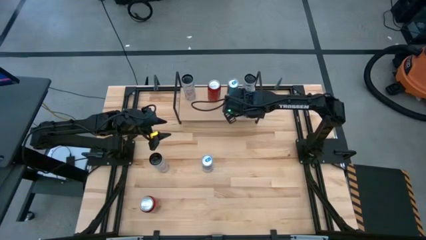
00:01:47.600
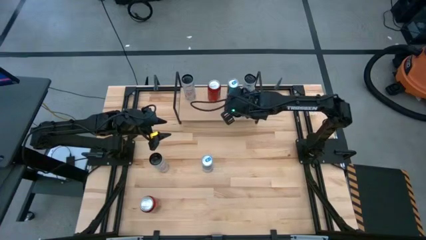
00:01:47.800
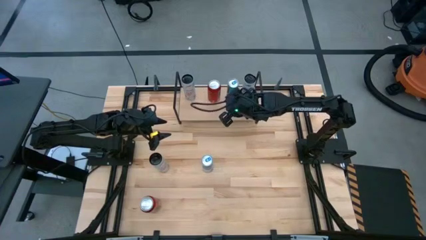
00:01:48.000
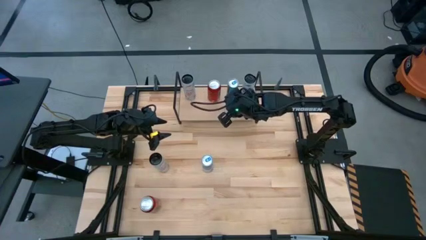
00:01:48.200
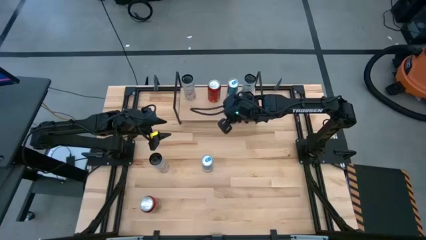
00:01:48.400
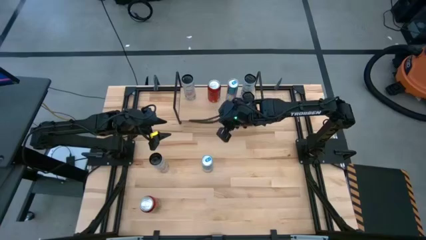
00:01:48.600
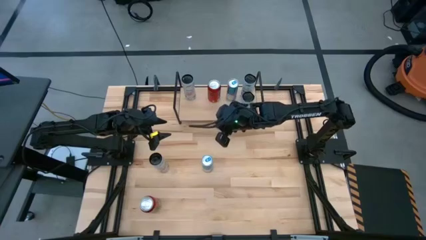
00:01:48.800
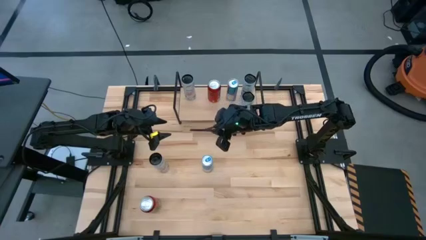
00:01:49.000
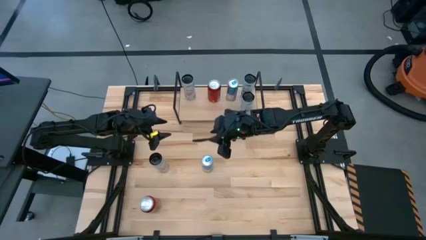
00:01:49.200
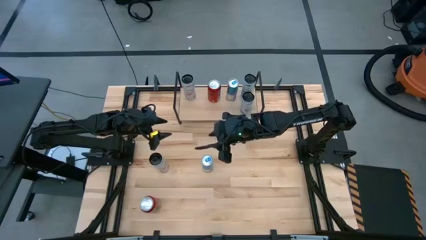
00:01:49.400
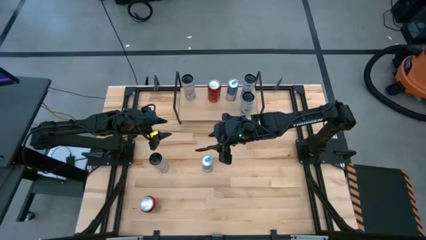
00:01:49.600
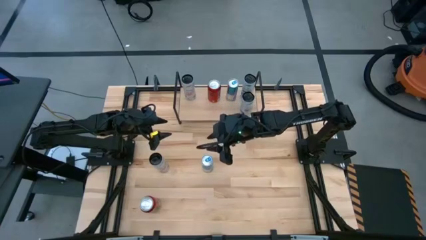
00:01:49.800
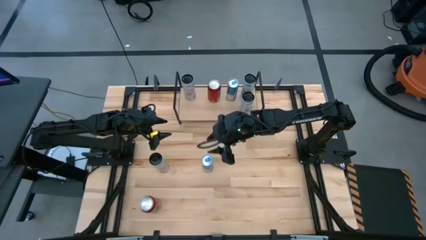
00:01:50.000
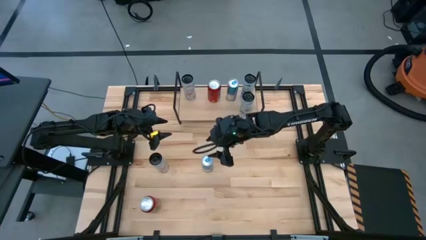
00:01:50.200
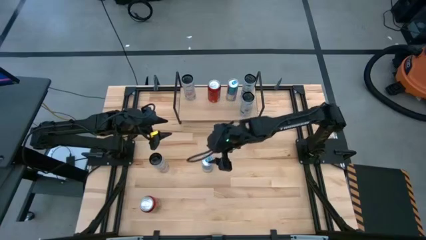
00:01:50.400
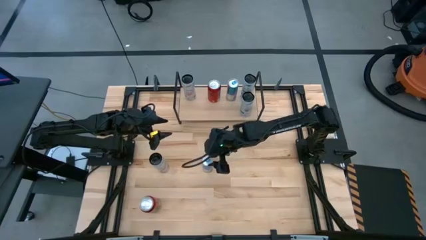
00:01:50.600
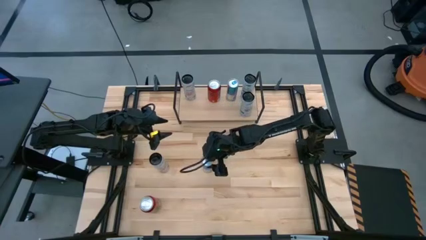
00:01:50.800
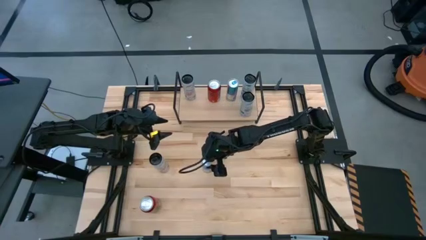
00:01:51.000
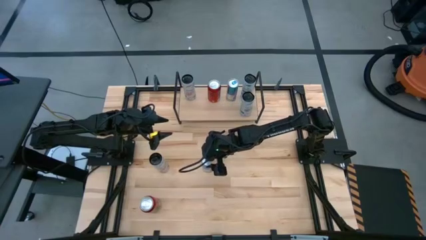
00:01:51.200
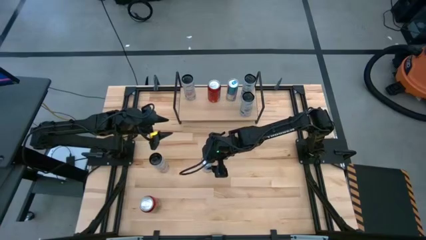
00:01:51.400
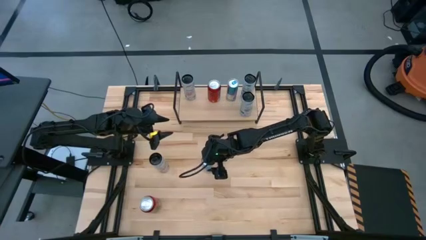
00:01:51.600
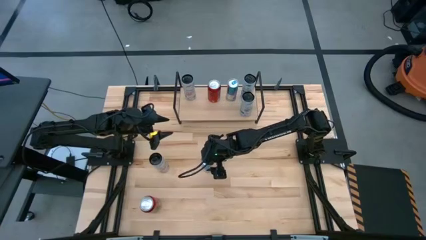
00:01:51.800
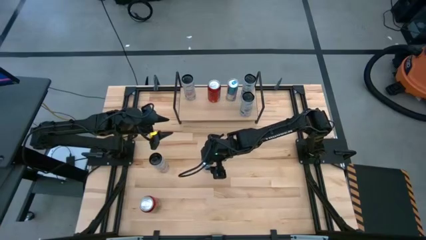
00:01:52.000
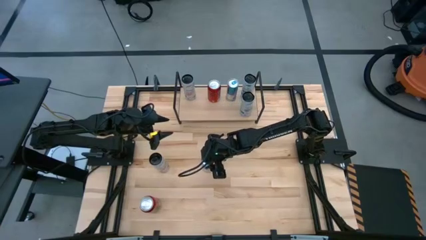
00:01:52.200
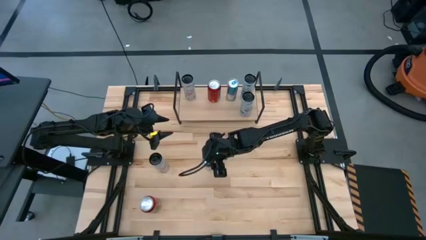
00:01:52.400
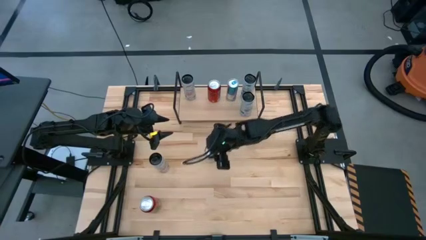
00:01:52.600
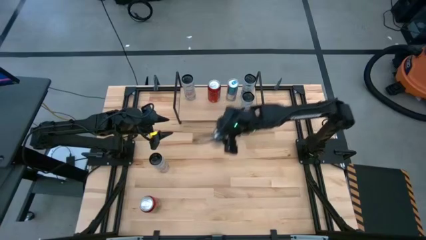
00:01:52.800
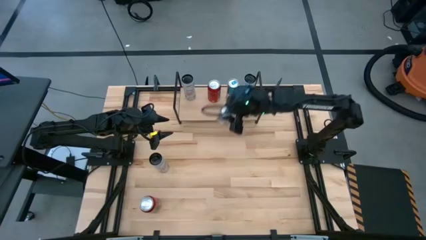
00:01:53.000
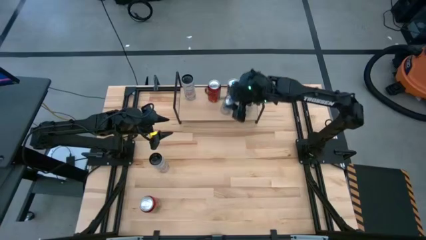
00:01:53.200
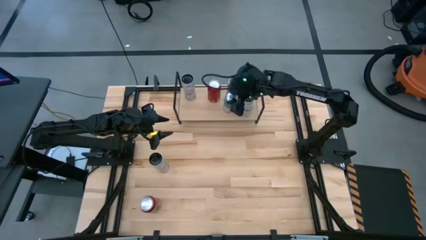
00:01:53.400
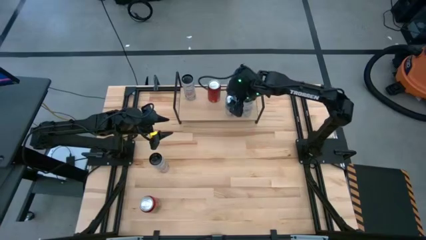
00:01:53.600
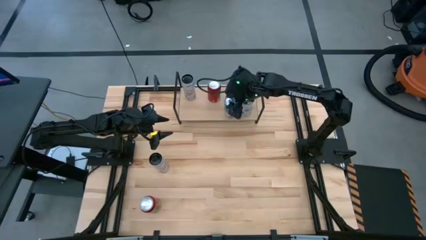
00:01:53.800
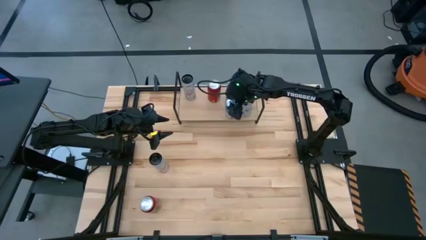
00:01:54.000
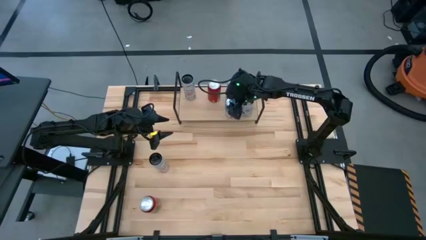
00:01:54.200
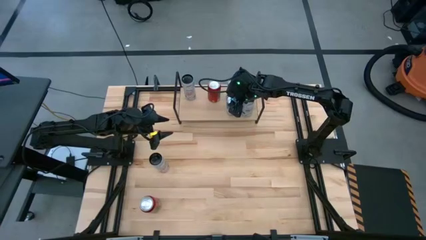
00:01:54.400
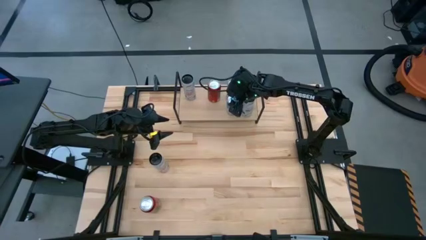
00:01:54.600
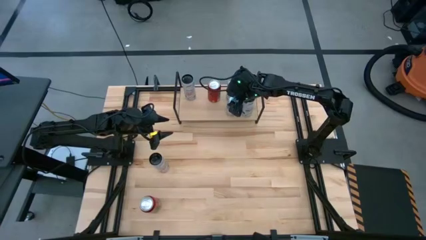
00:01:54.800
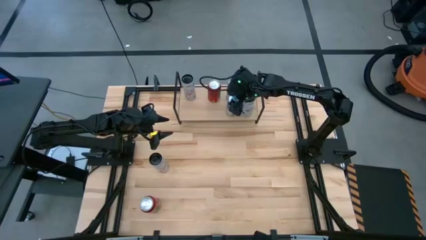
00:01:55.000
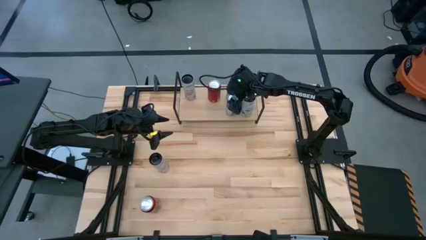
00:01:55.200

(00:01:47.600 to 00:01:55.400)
Task: Place canned beverage on shelf
Put the blue soda can on the shelf aligned with the other blue soda can

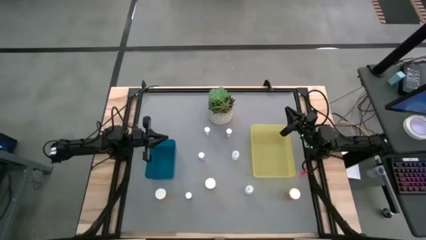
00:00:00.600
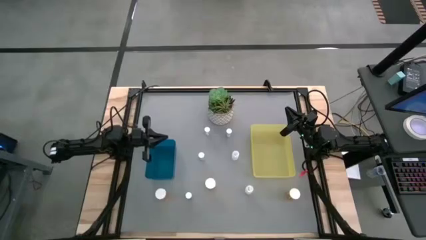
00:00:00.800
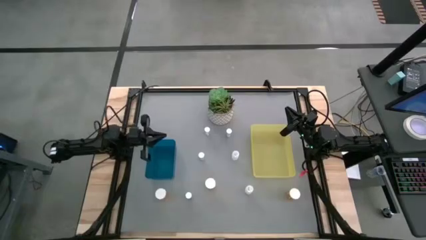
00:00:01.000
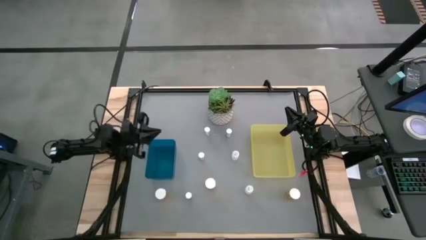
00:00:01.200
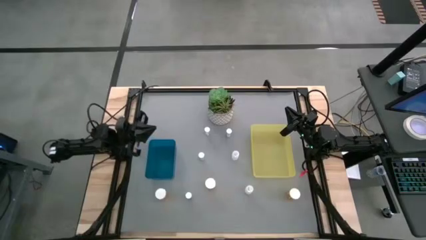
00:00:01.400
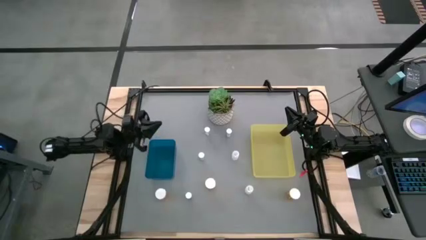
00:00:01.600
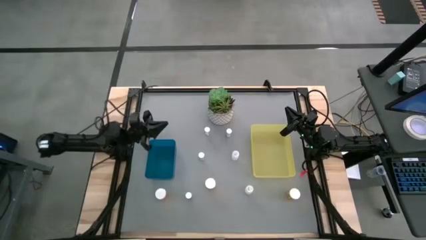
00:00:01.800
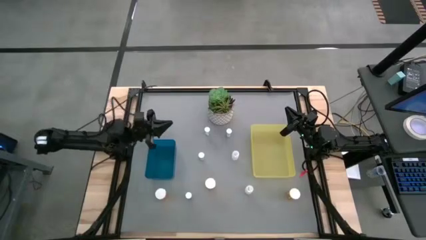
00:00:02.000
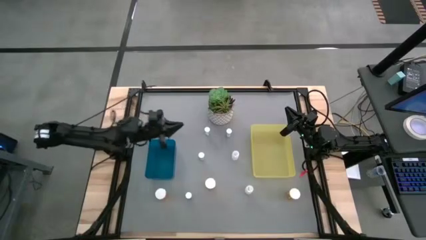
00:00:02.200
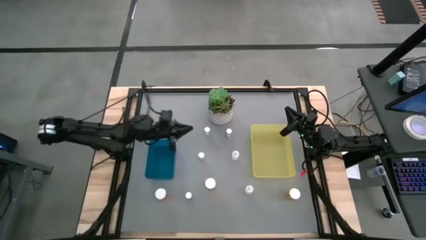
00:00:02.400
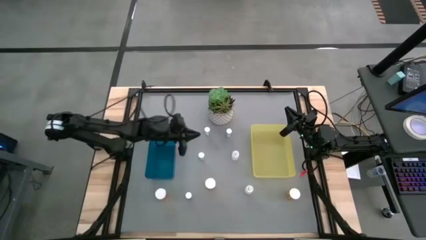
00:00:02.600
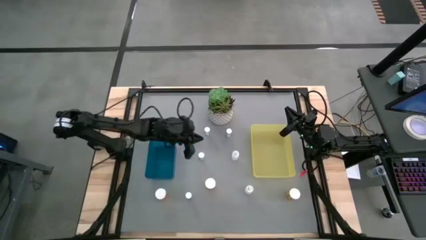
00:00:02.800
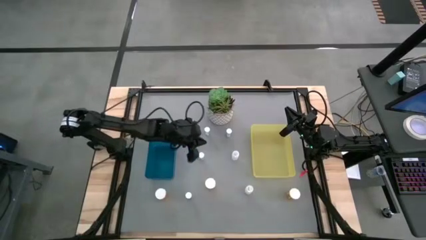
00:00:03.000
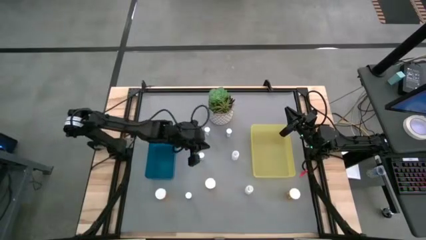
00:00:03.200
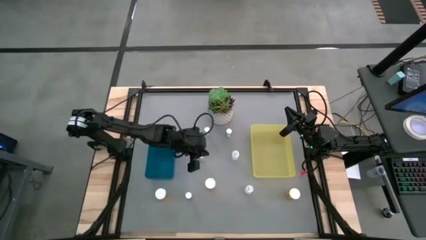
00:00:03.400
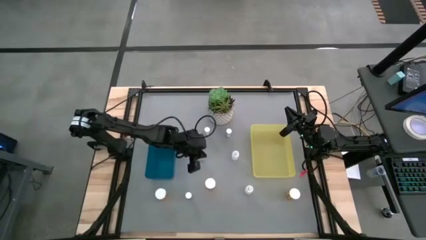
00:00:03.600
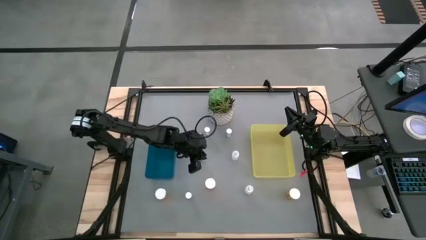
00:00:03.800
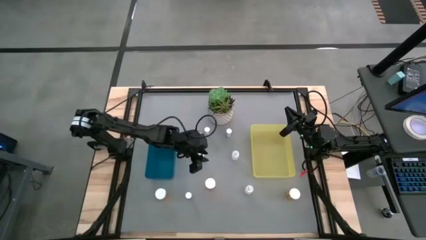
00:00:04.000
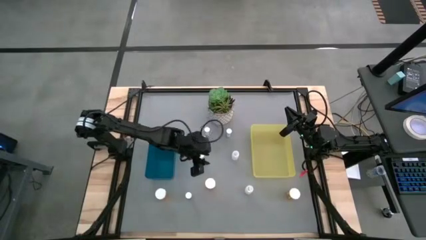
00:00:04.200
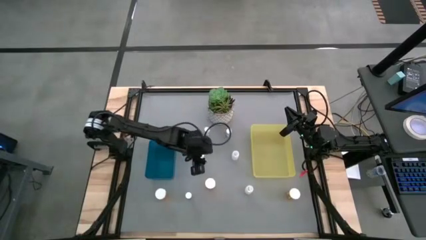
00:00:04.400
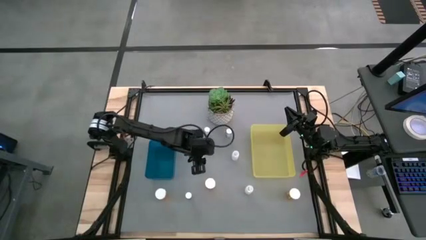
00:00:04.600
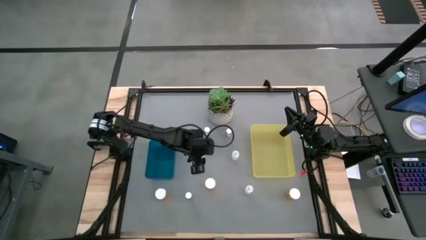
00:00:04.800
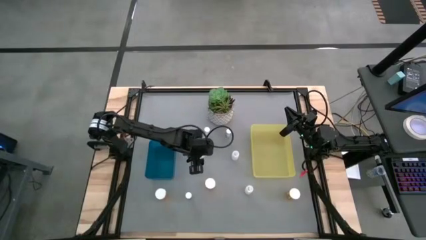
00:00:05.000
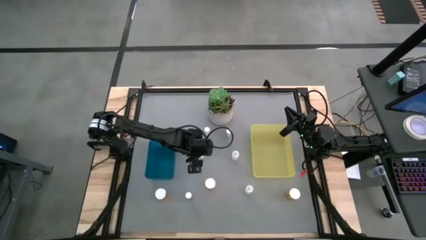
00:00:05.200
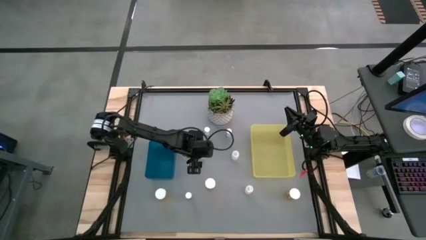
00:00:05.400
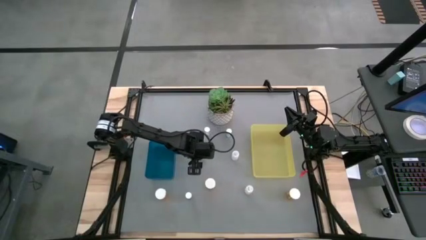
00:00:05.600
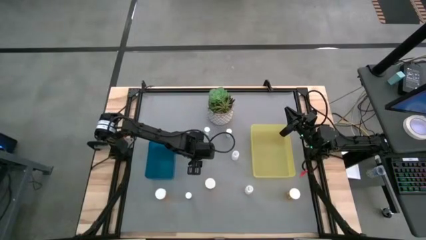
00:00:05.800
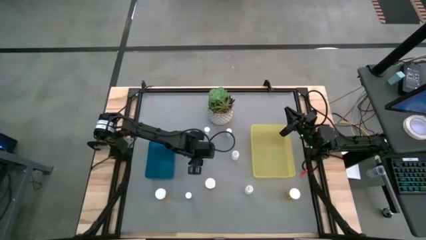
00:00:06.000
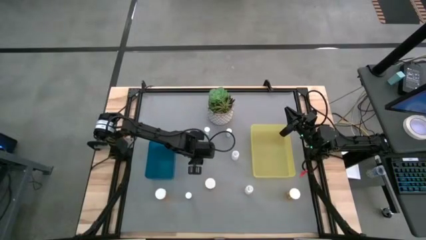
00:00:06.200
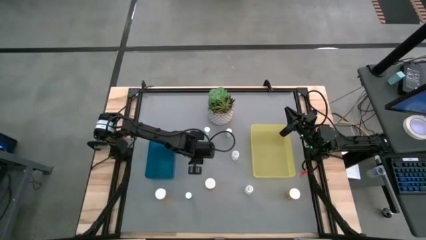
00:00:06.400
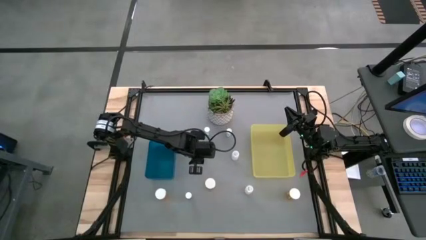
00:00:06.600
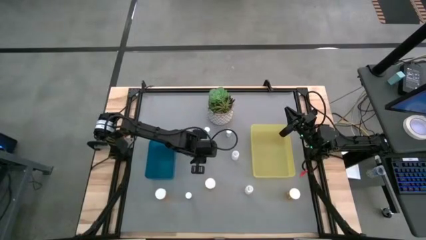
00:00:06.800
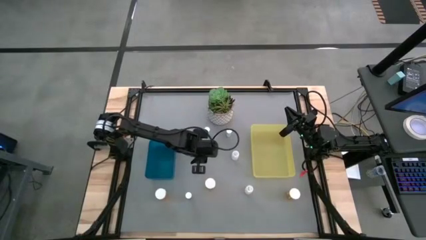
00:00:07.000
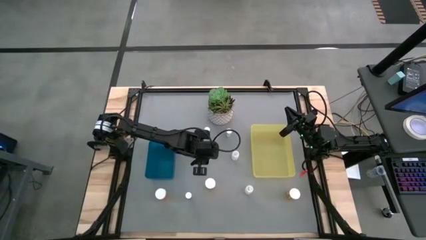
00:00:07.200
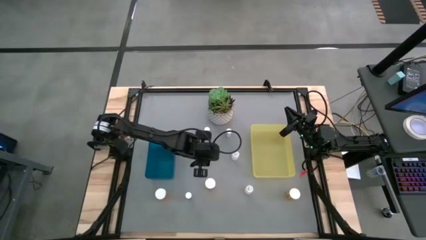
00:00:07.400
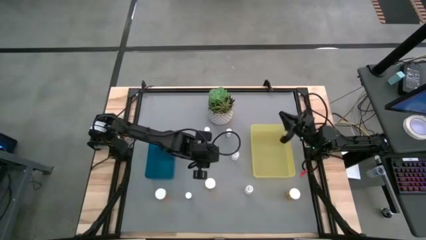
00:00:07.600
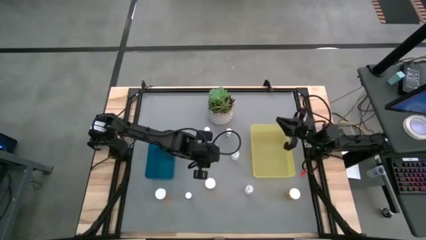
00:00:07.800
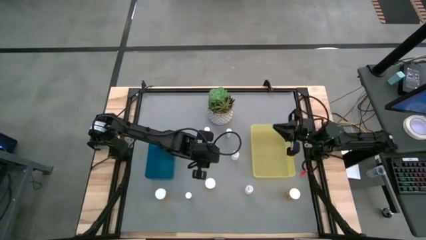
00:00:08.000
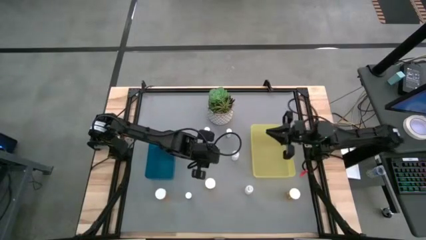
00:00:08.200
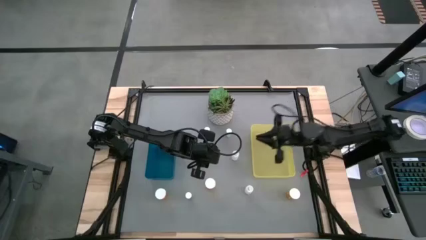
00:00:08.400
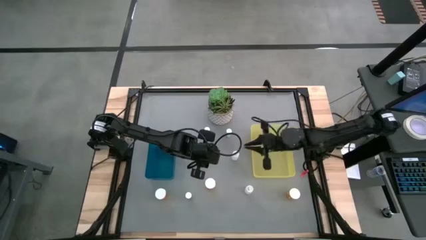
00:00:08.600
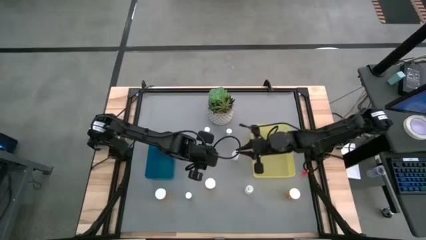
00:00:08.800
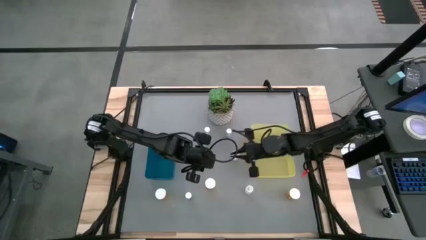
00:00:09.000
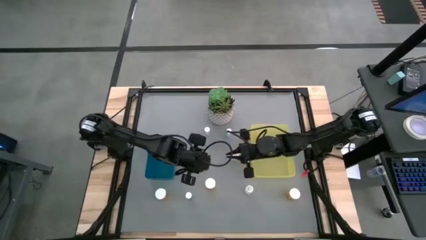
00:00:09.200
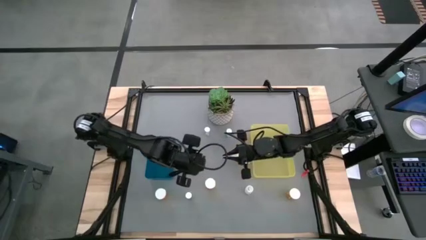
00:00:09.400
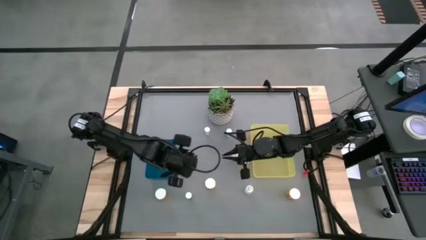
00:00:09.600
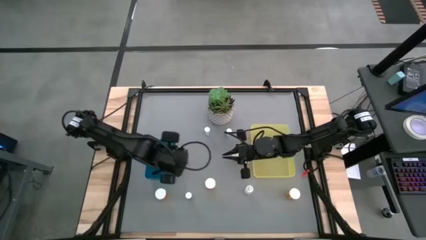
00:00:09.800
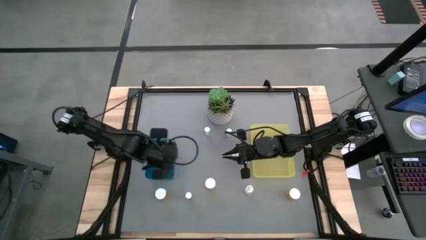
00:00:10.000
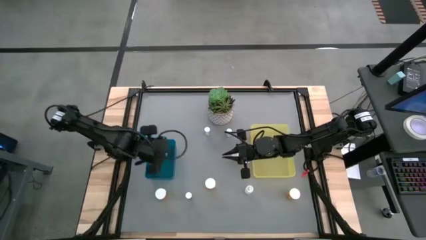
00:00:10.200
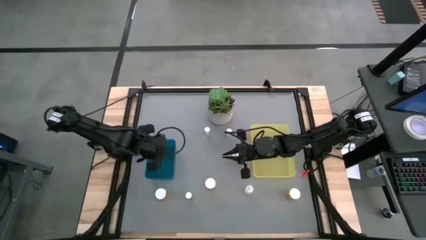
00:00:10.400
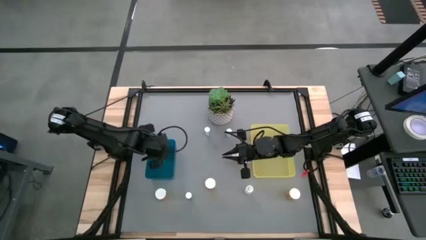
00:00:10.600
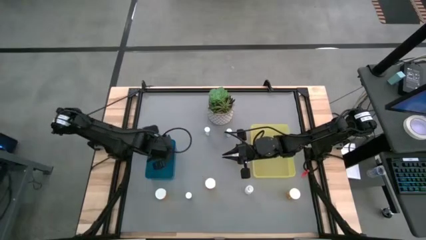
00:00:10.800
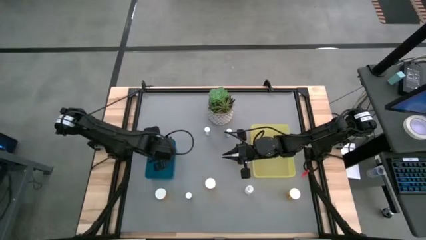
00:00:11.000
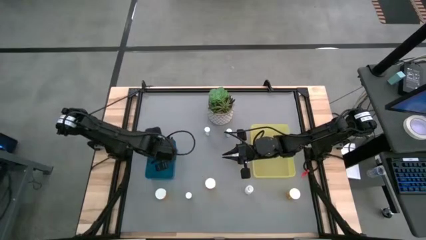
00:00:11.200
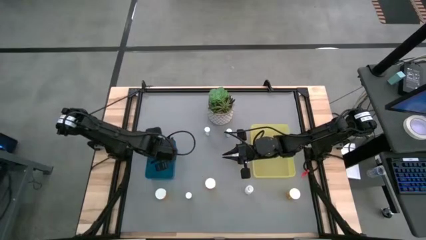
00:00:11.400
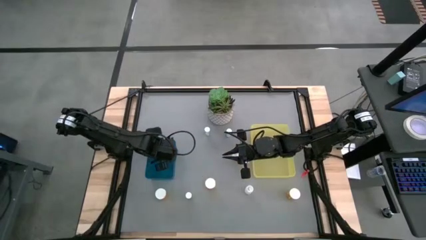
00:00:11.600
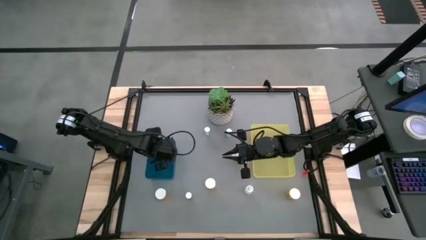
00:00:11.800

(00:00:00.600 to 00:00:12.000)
Task: Pick and place medicine bottles into bin by pill shape (circle, oval)
Put the bottom blue tablet bottle into the left blue bin
